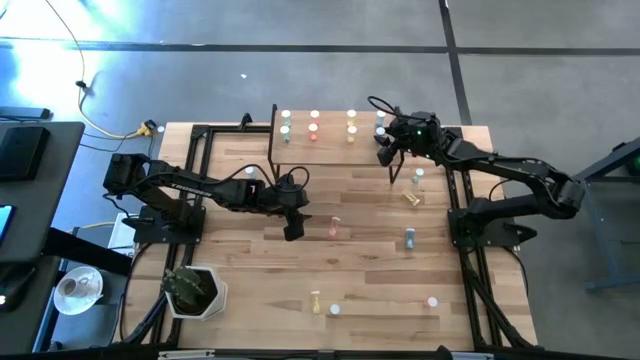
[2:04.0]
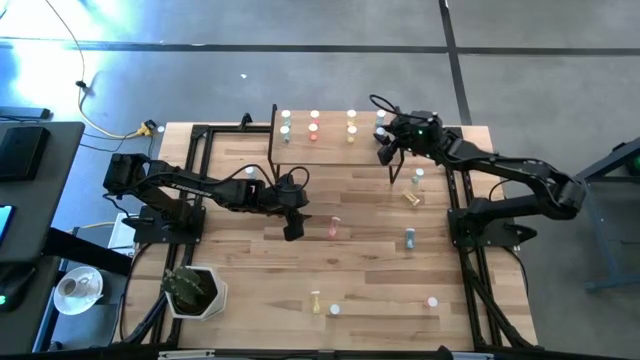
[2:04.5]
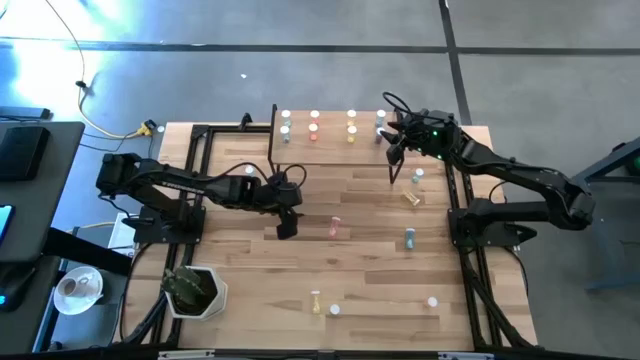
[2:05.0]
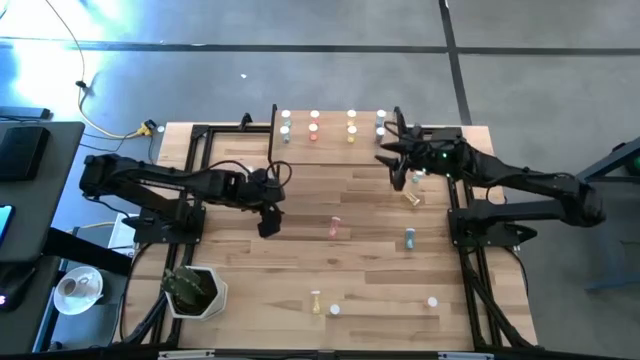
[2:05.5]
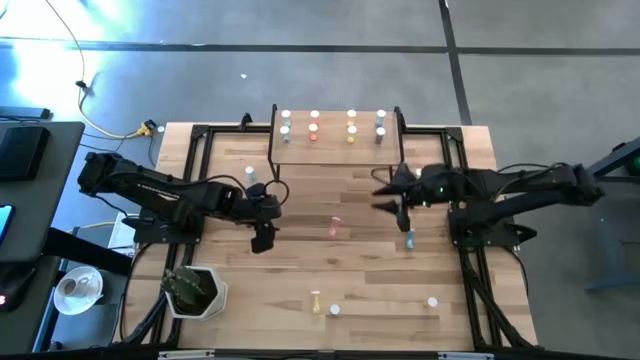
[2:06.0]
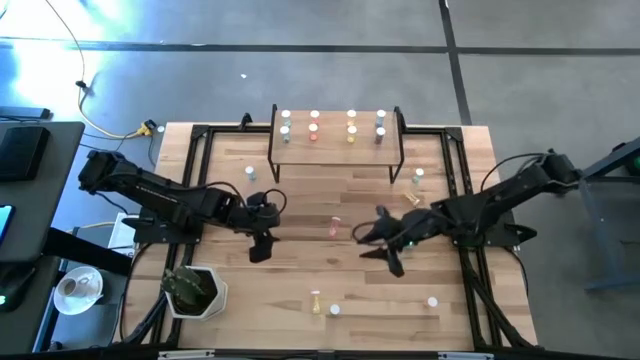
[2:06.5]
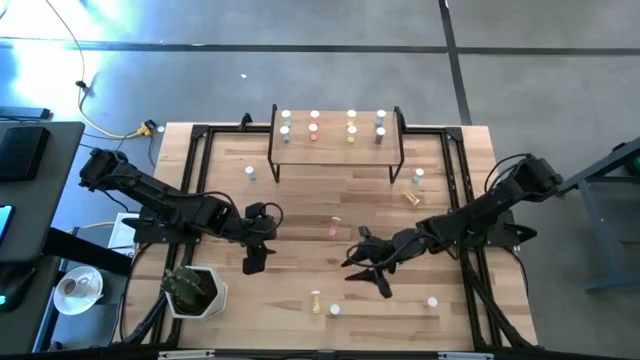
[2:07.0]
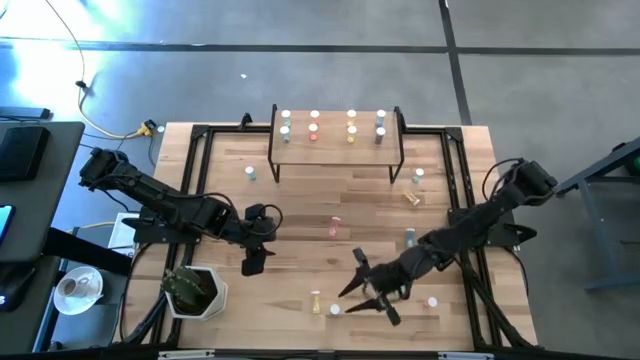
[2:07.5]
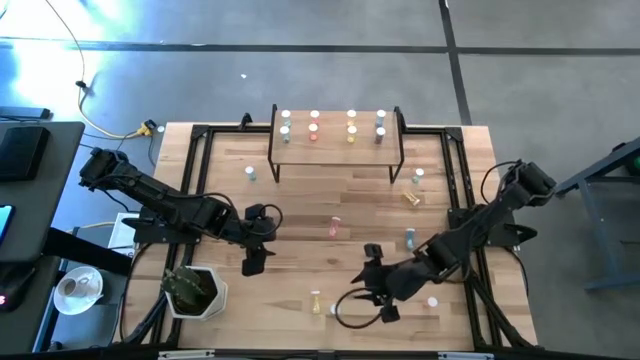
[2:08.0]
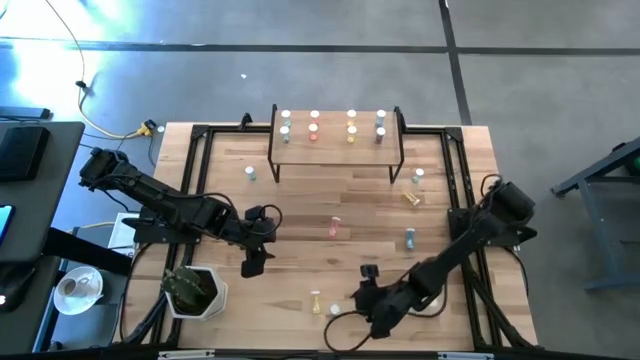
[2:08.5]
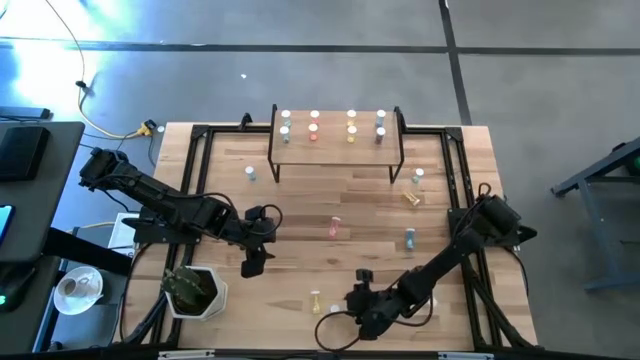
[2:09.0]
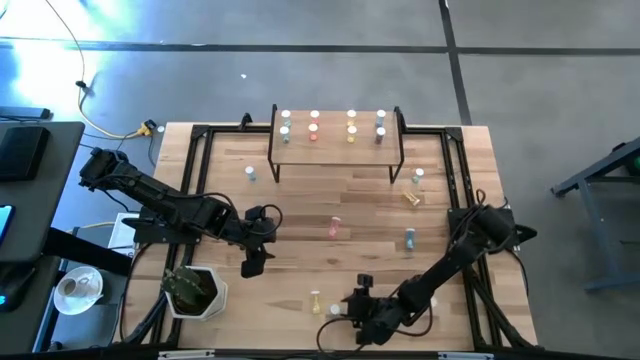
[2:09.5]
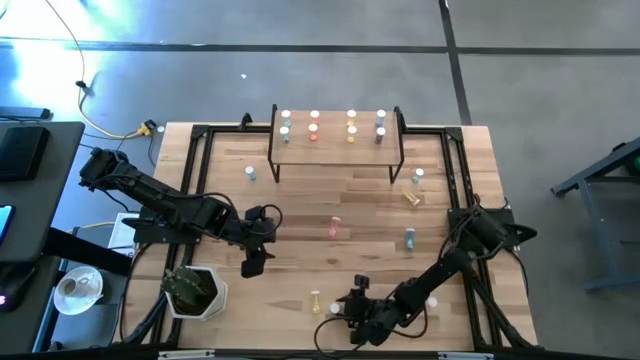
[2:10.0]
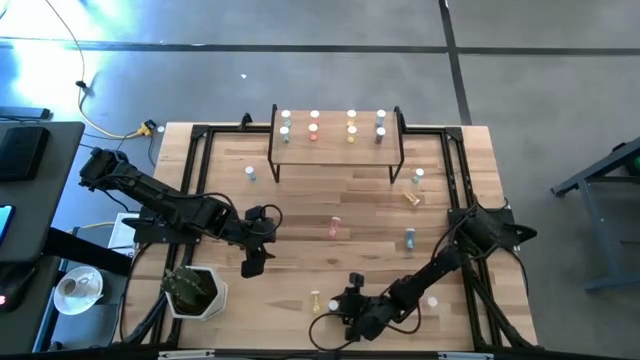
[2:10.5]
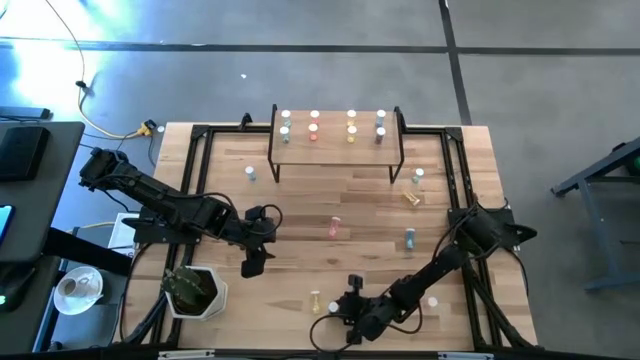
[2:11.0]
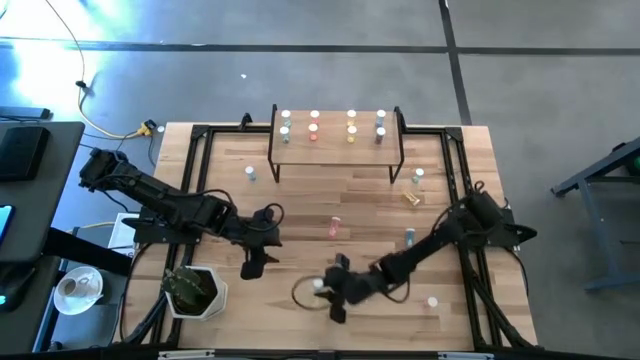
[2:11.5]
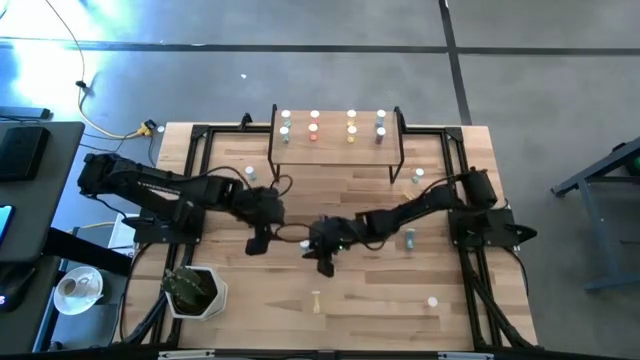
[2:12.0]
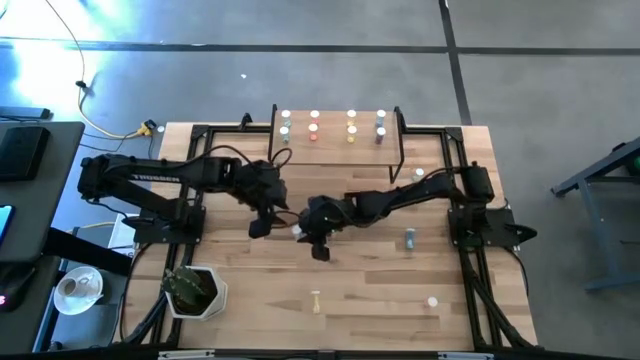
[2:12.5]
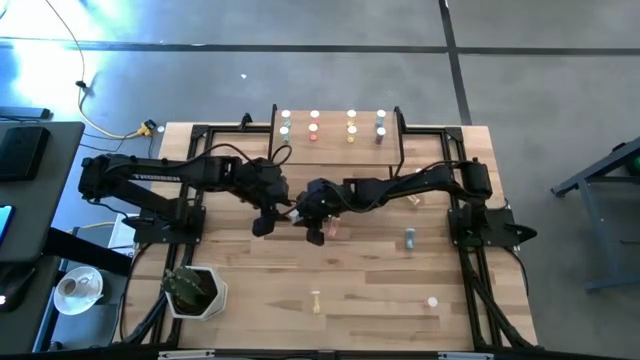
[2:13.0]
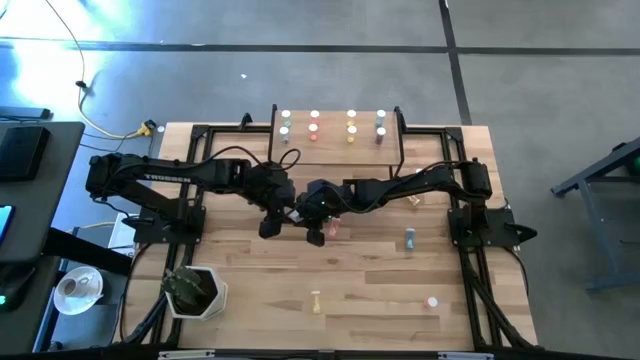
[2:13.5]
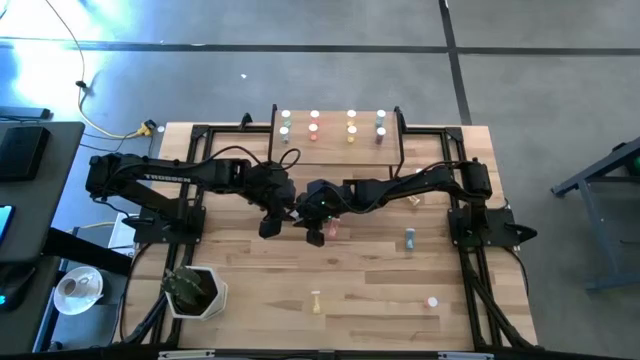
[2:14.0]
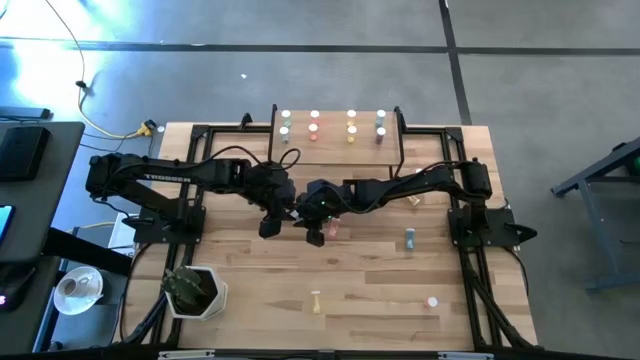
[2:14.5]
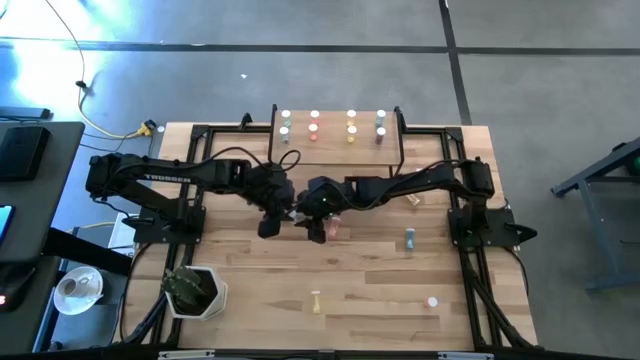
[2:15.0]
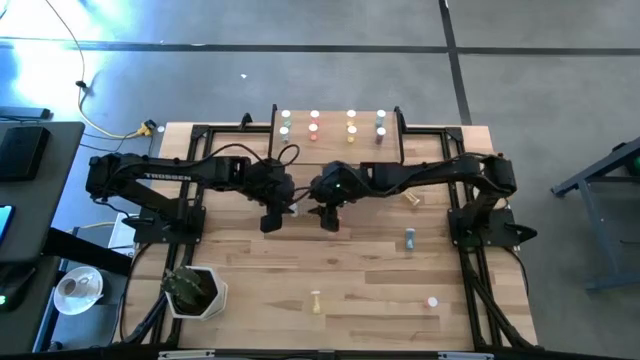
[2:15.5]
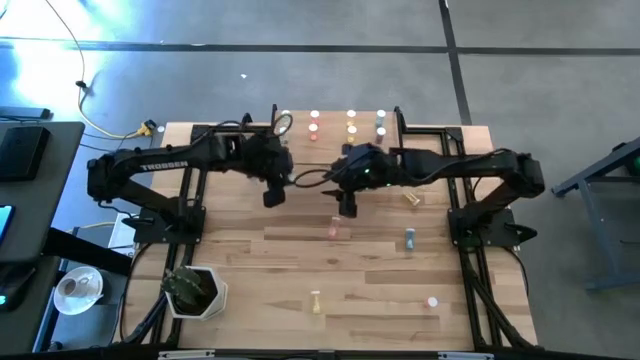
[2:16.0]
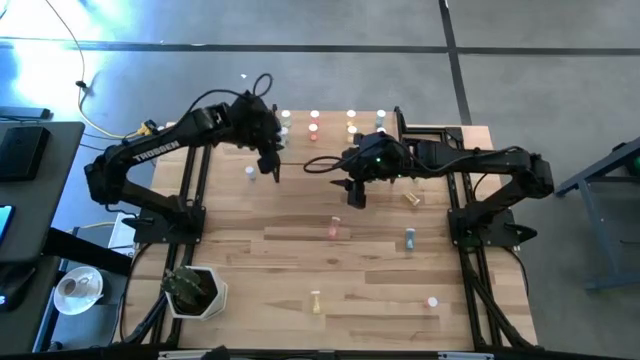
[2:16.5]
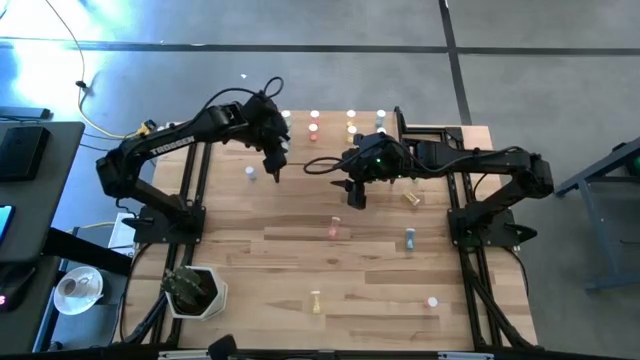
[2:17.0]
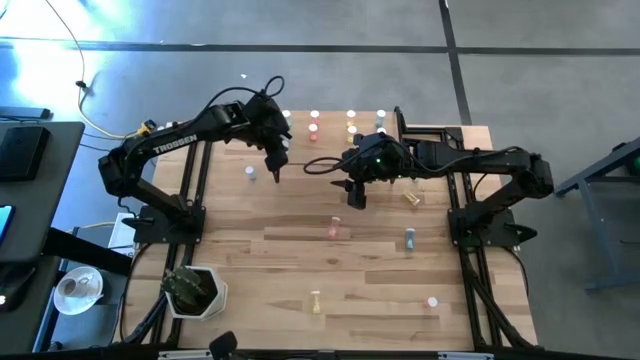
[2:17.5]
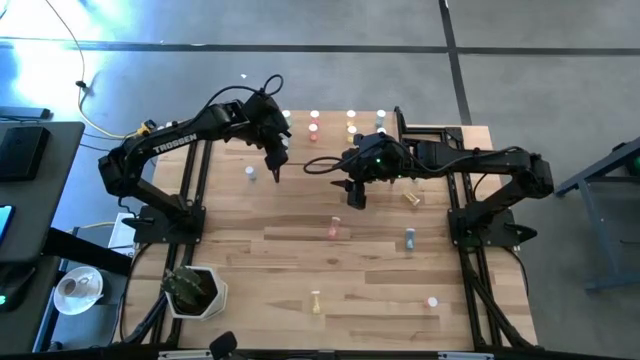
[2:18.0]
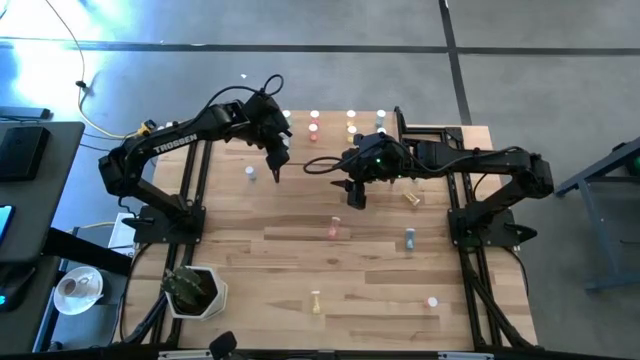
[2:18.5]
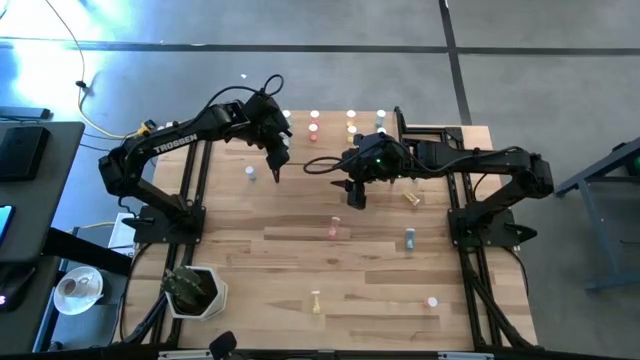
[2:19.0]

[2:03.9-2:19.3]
Task: Pick and place medicine bottles onto shelf by color
Put the green pill bottle on the shelf

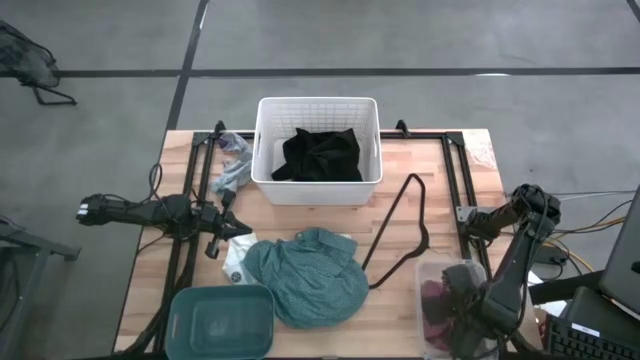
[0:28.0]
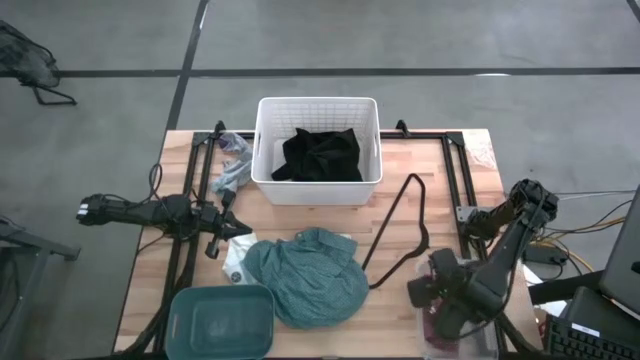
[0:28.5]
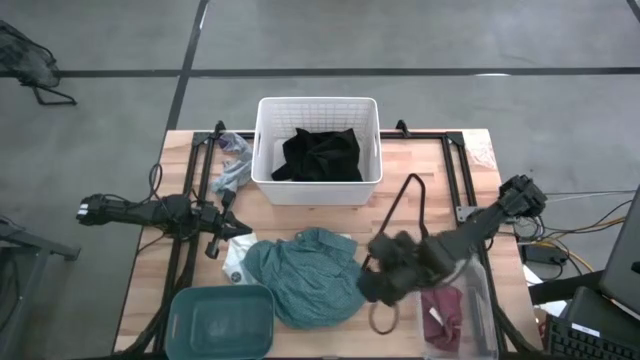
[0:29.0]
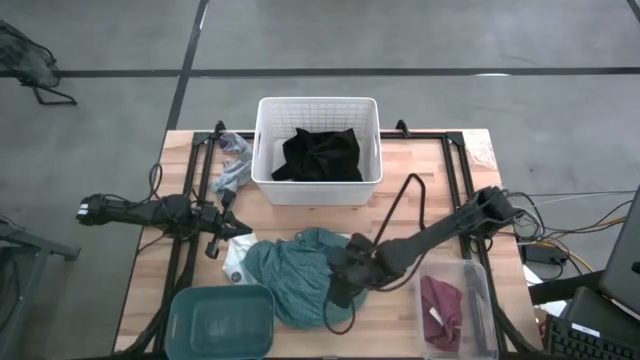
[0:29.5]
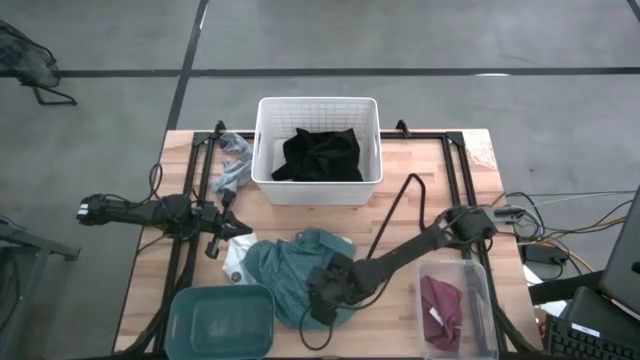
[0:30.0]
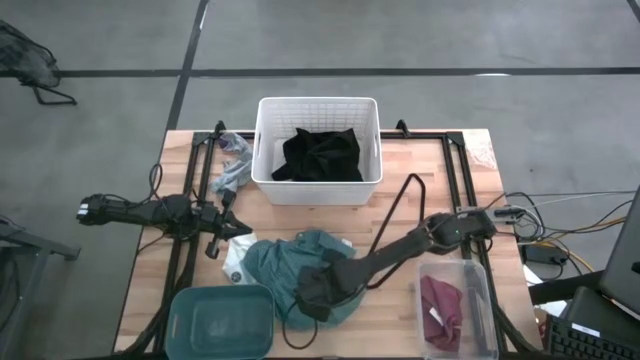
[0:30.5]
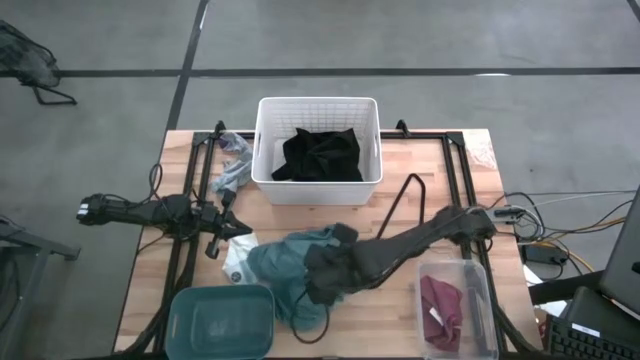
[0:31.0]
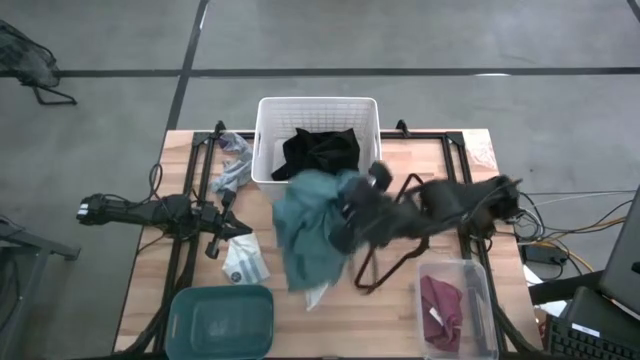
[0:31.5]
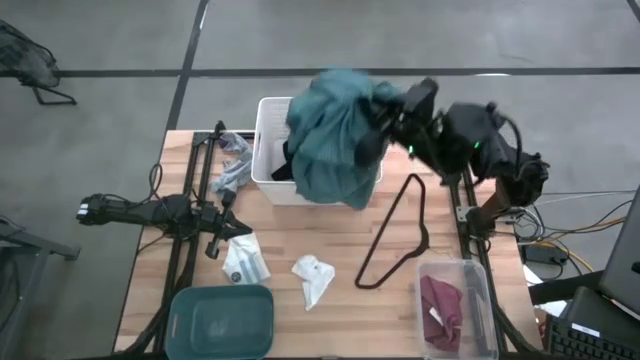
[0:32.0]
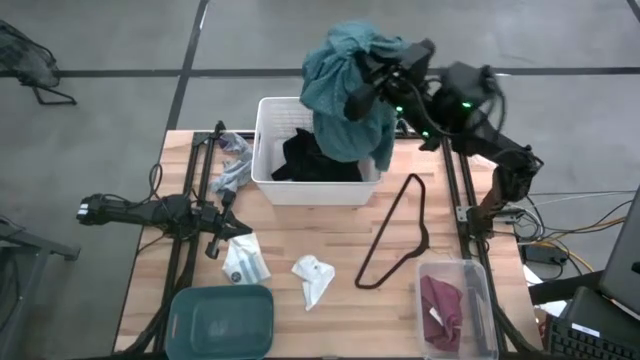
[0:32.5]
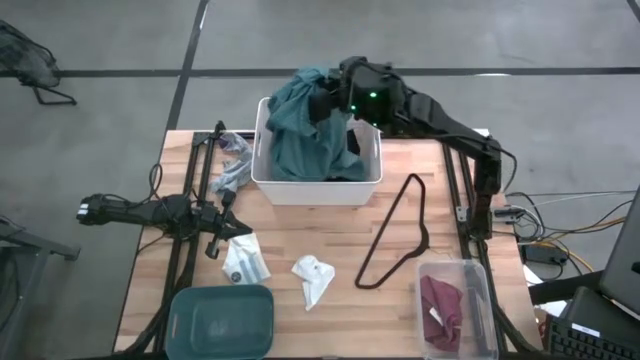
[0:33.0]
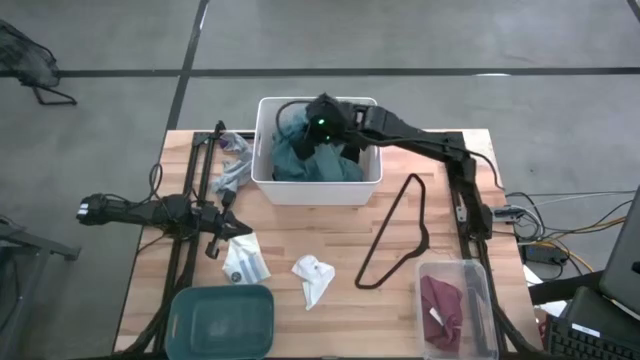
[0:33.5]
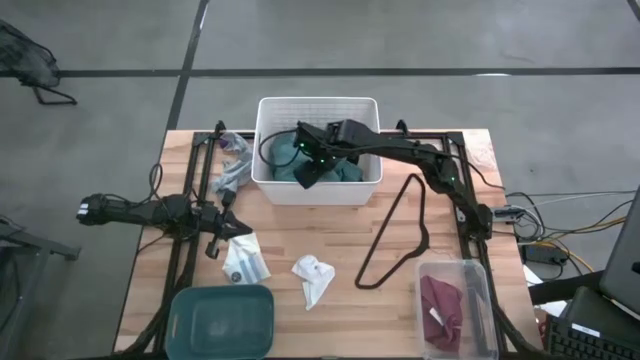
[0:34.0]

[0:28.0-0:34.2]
Task: Pick & Place Cloths
Put the green shirt into the white bin
